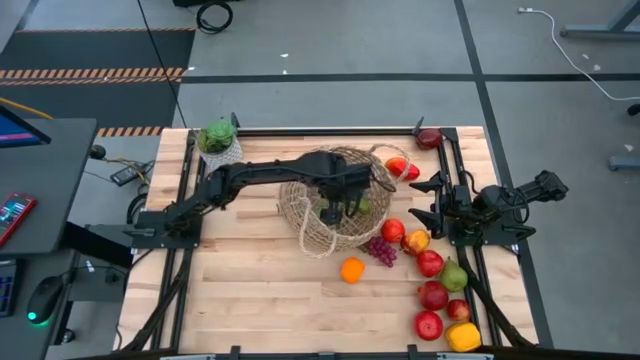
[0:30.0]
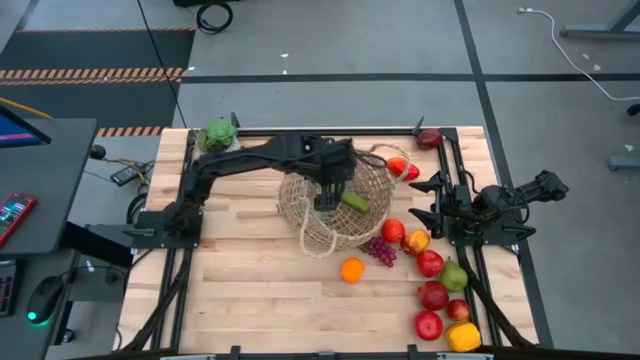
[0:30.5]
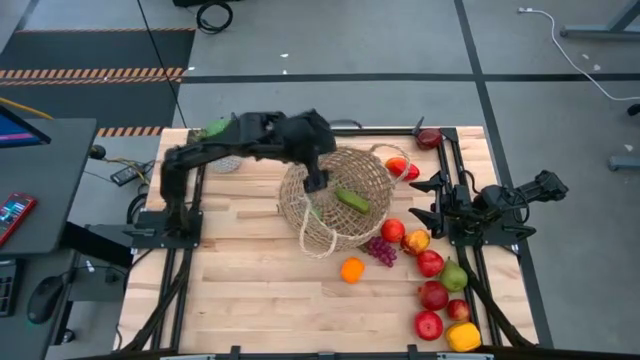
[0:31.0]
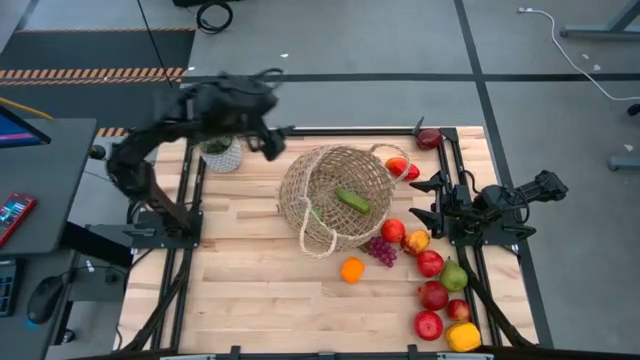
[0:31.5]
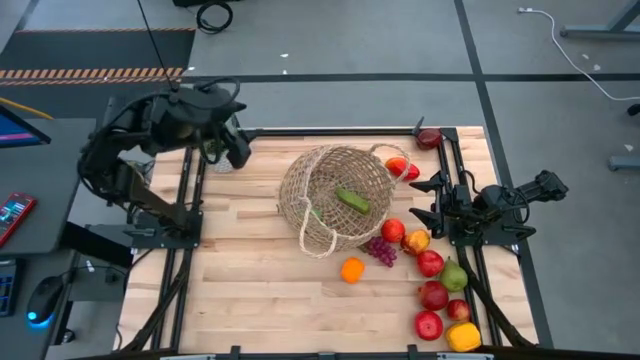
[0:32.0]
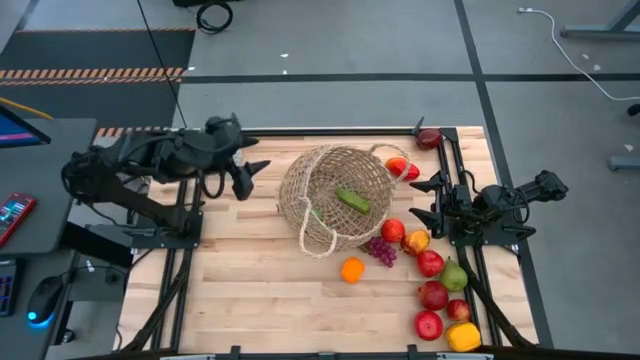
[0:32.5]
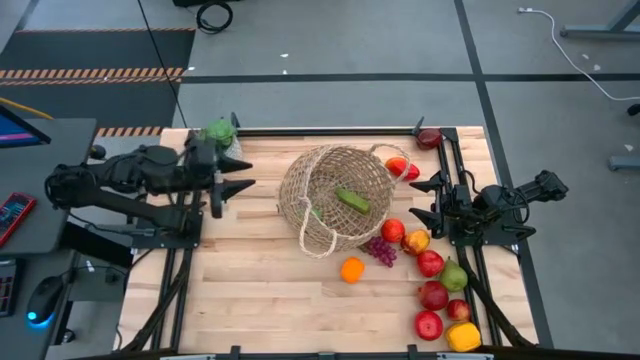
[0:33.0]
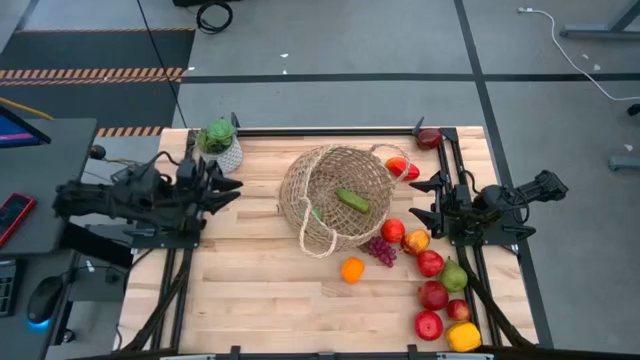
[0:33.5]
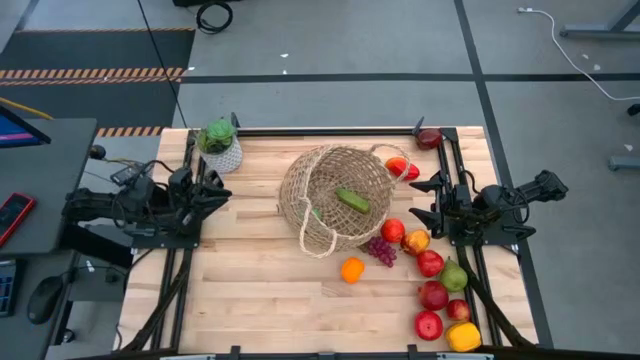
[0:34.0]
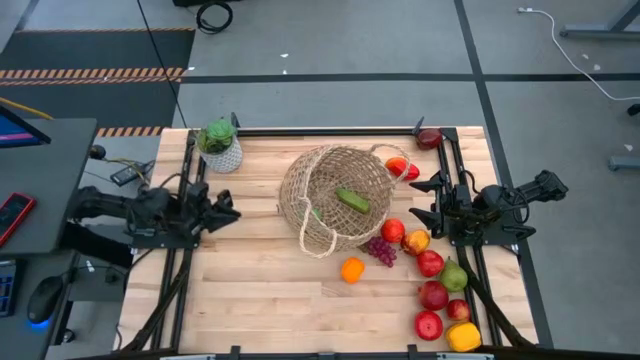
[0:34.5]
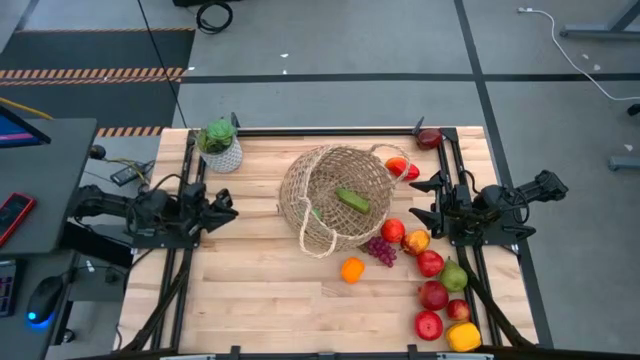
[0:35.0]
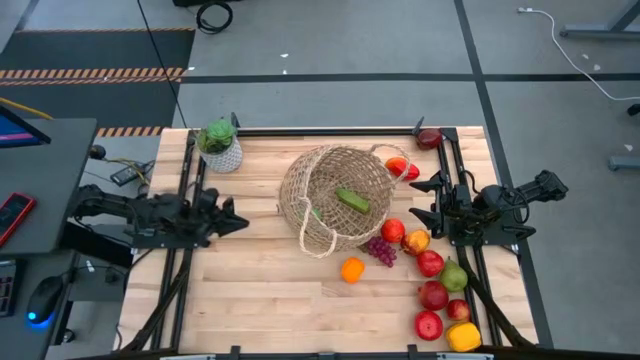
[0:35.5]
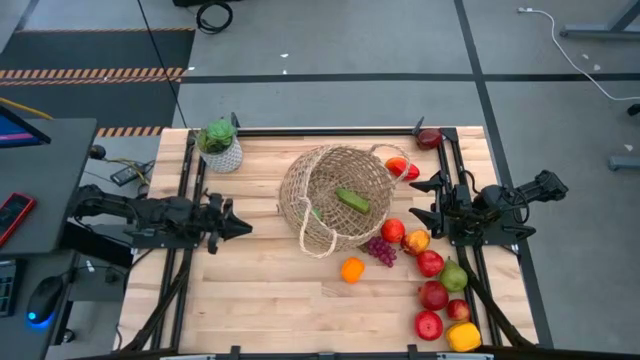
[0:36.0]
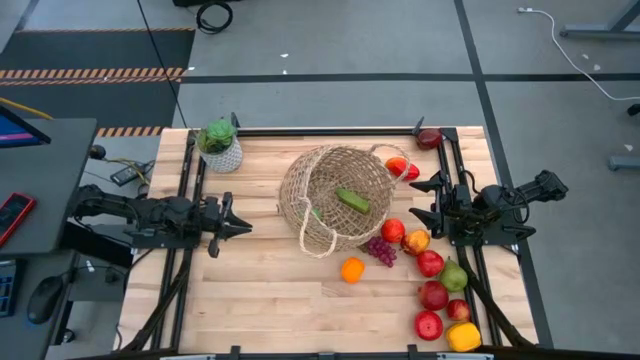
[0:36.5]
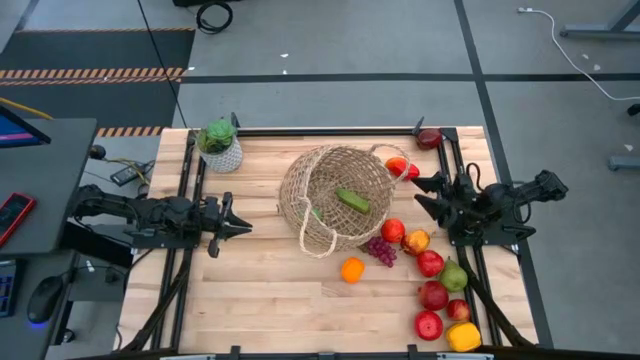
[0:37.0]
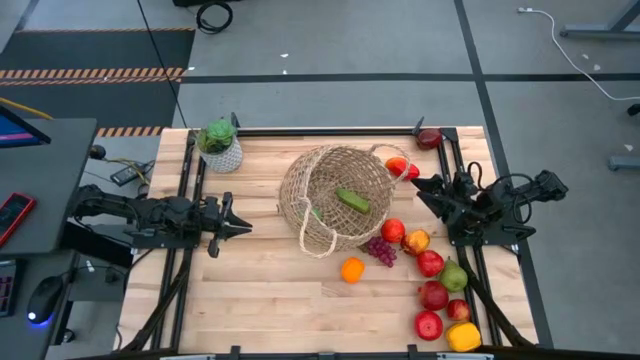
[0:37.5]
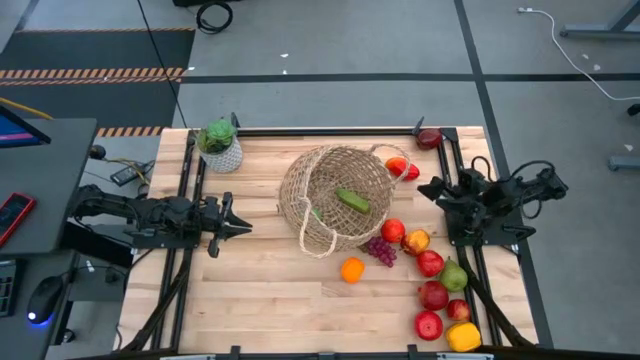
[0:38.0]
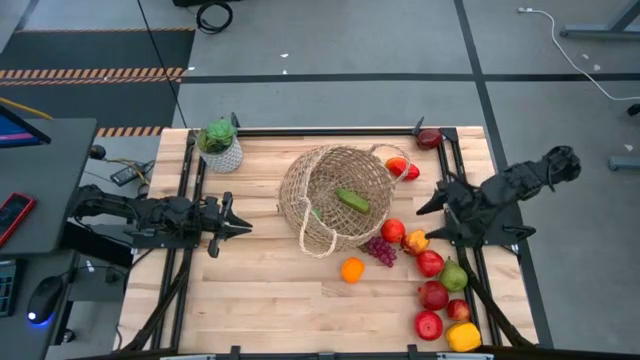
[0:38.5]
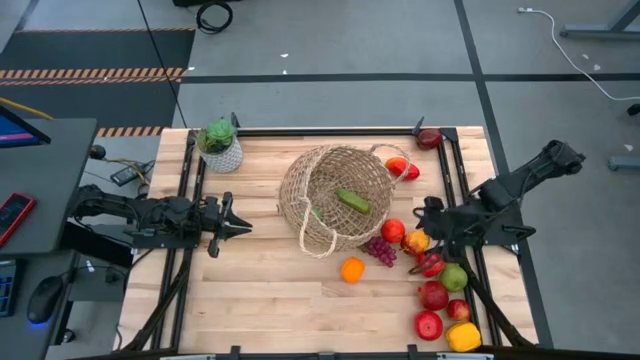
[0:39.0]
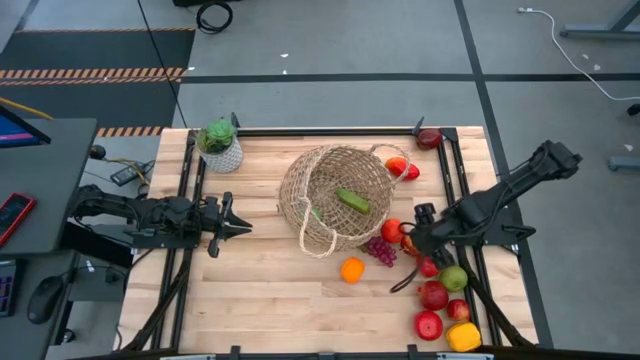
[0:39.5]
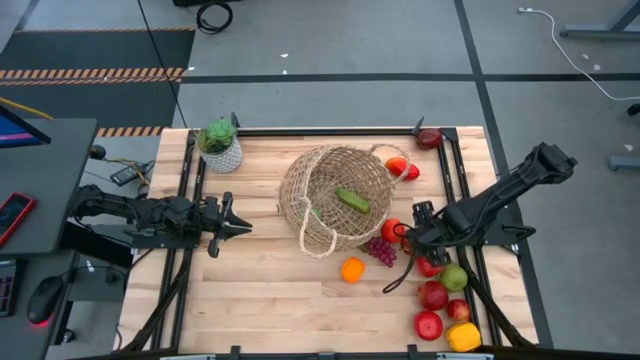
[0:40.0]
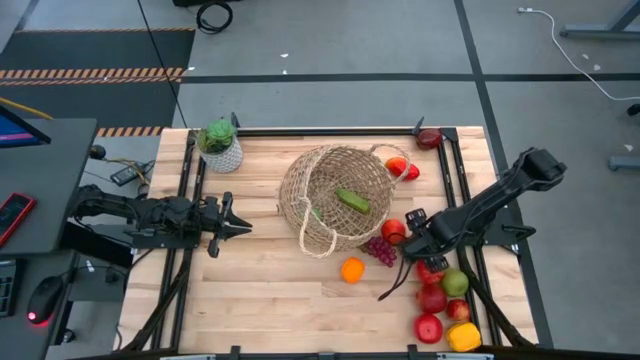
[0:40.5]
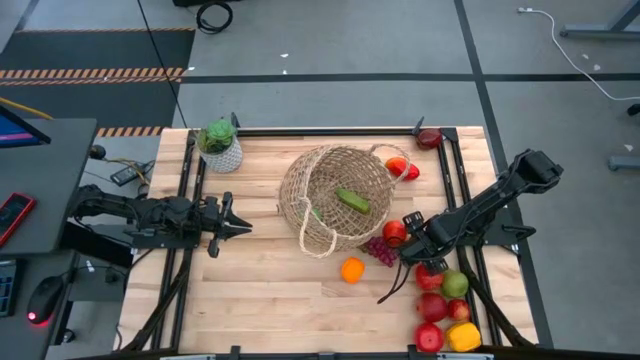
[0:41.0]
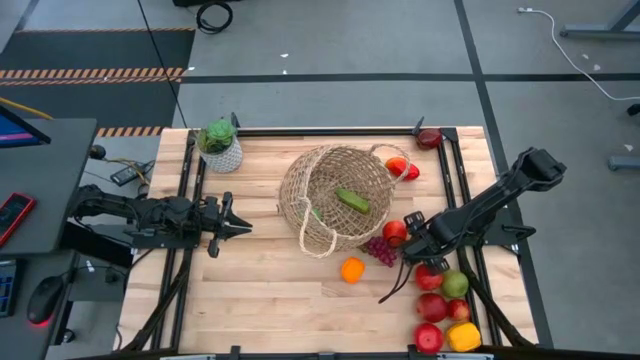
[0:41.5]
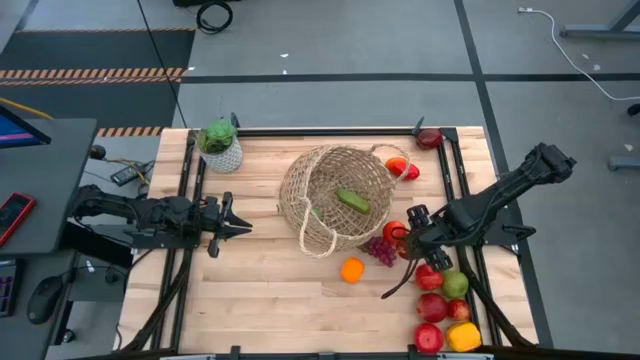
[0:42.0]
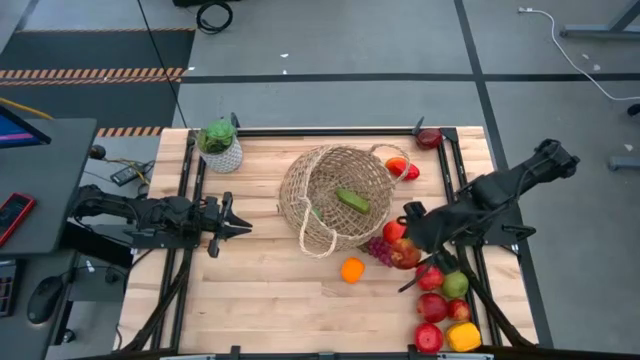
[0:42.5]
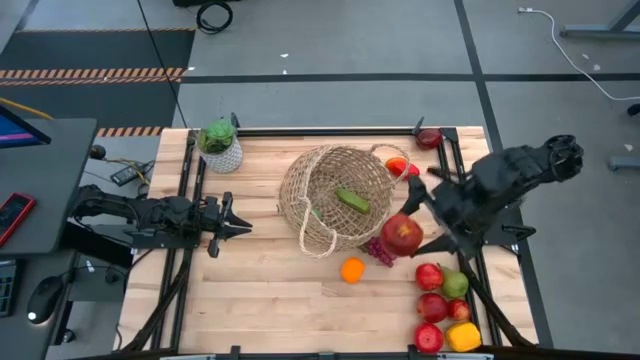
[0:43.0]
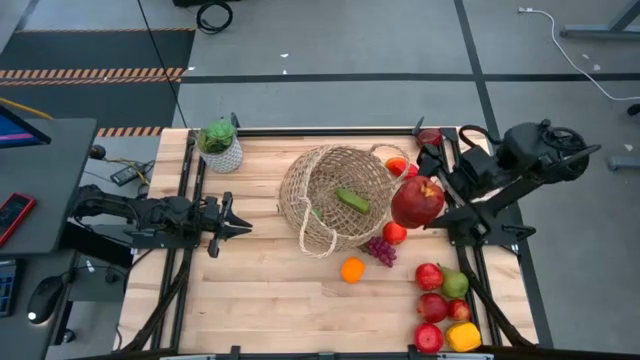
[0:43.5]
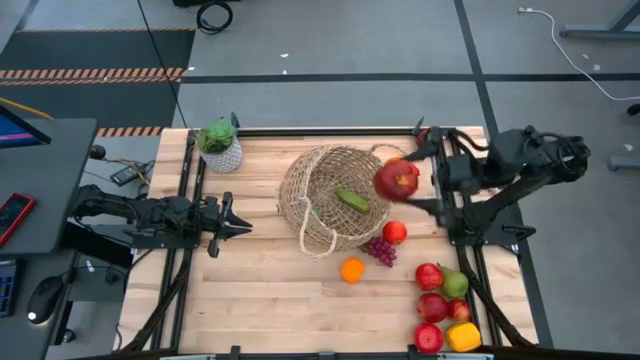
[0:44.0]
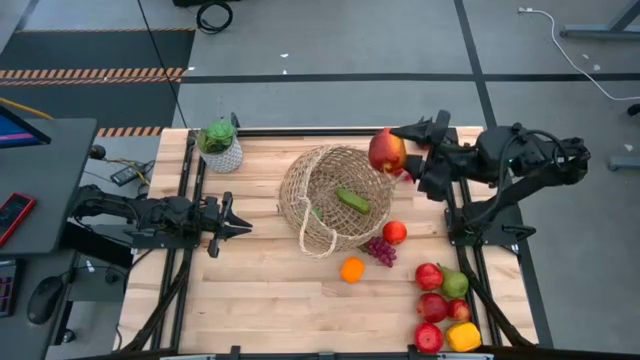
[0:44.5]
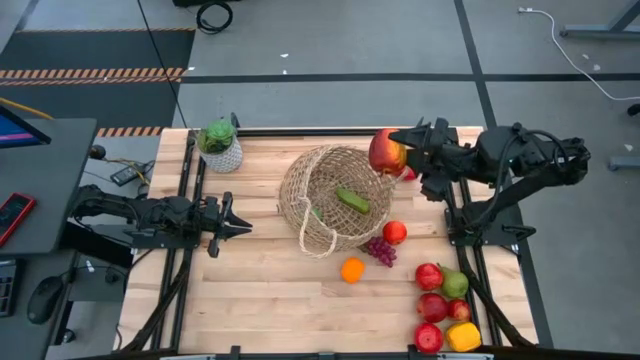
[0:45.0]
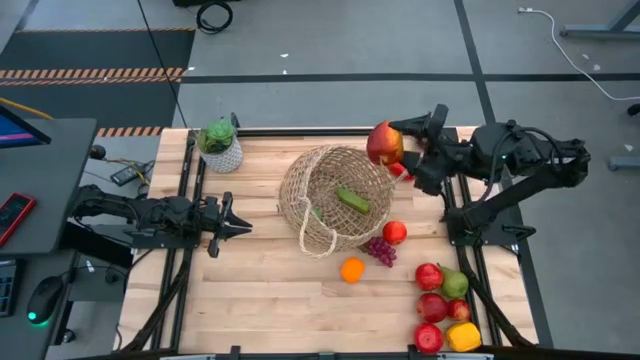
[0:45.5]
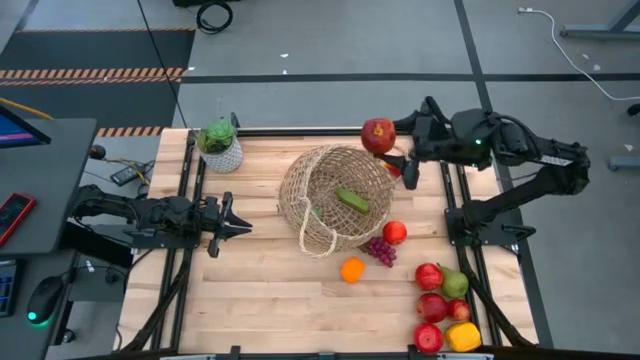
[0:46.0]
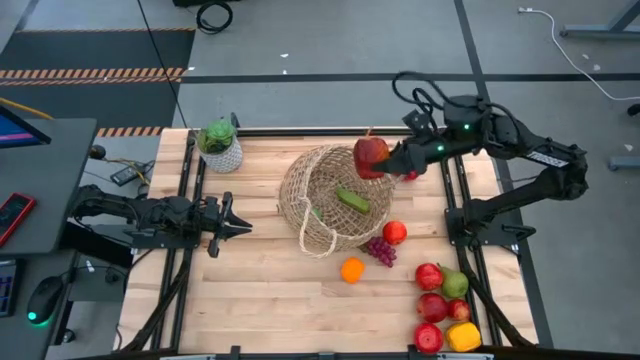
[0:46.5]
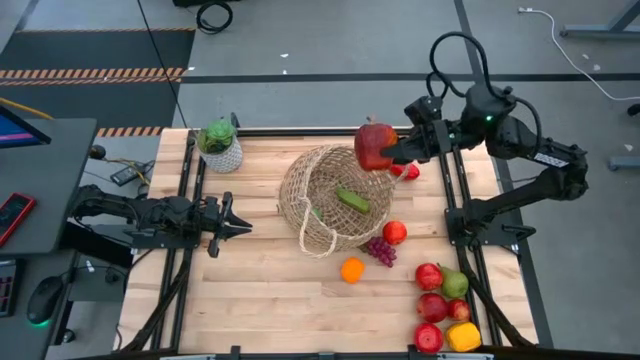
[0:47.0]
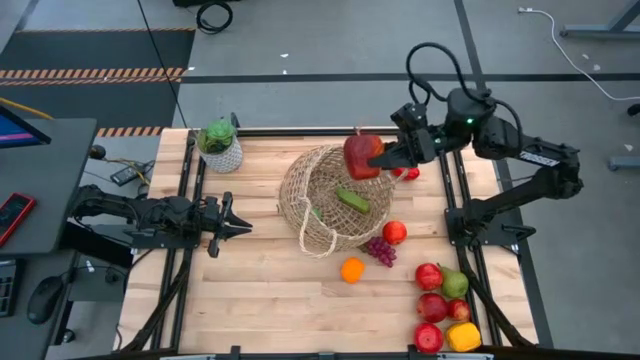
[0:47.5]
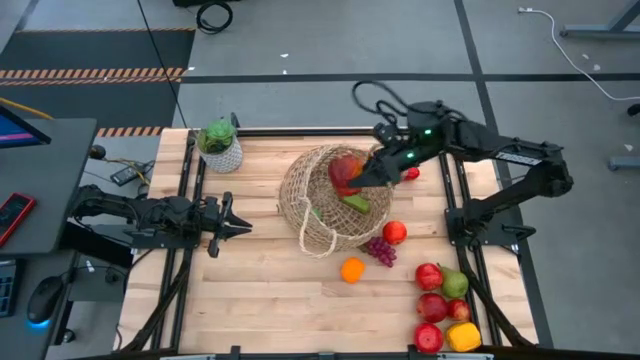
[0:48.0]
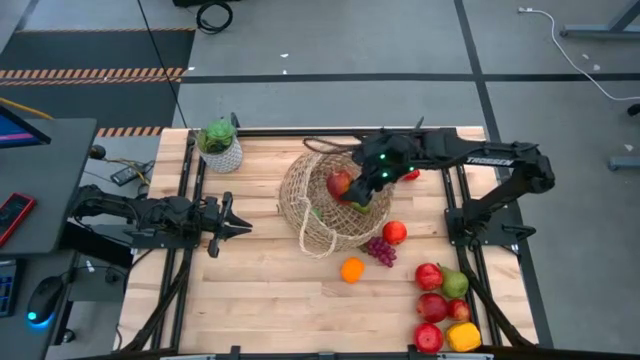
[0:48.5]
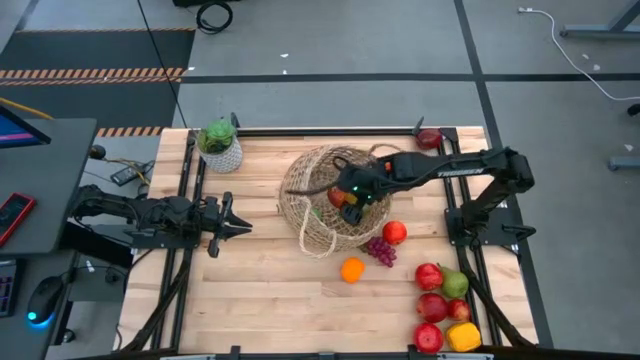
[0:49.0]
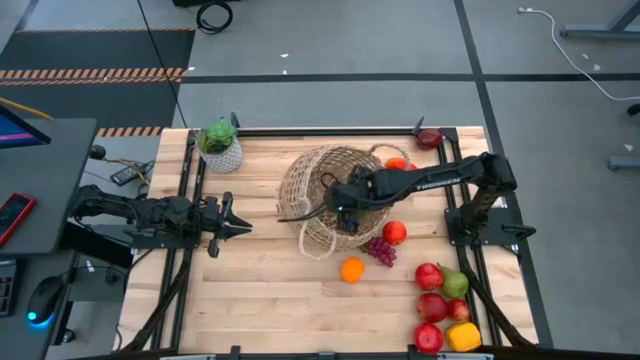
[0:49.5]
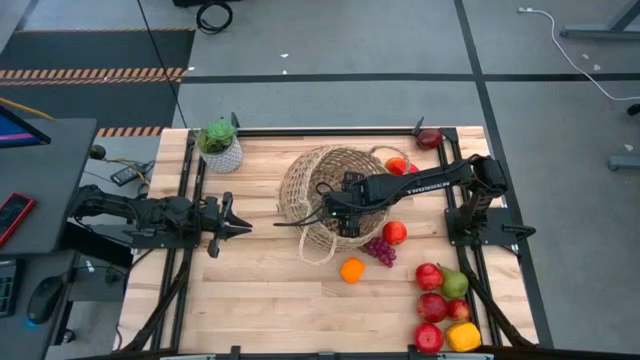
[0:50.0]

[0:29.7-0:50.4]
Task: Build produce basket
Put the red apple into the woven basket
